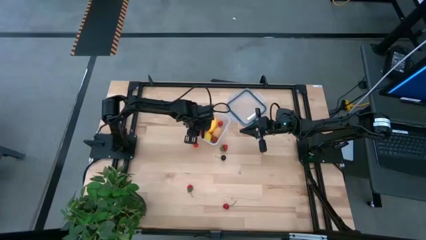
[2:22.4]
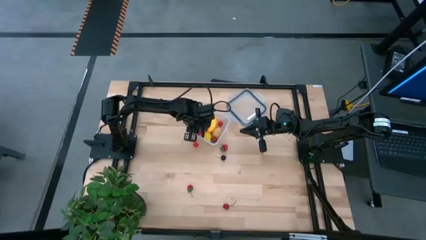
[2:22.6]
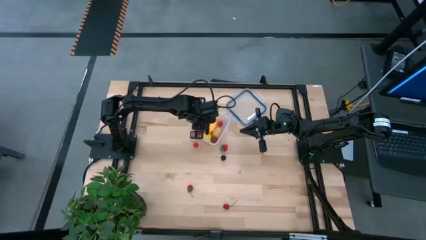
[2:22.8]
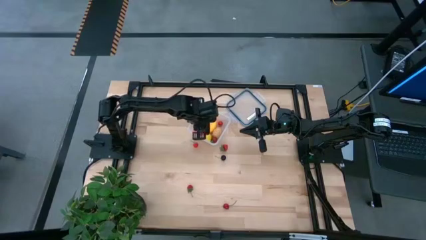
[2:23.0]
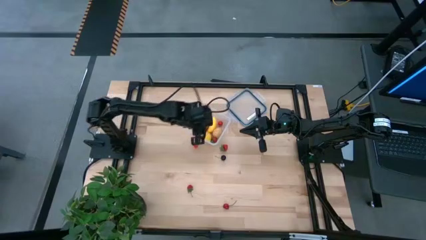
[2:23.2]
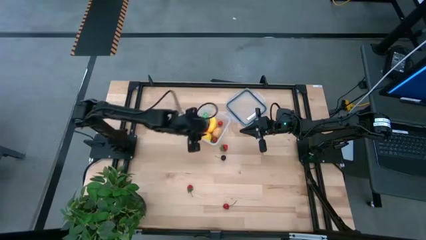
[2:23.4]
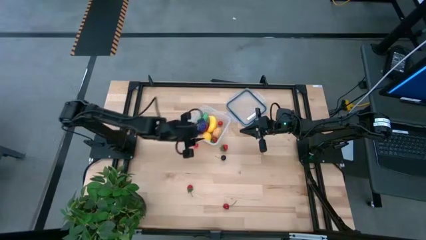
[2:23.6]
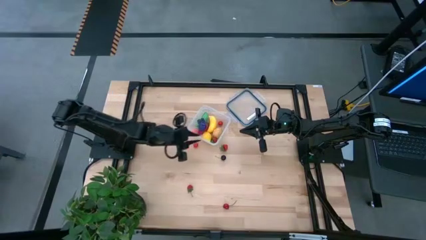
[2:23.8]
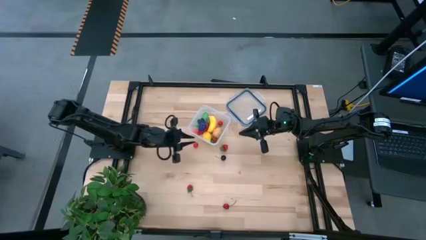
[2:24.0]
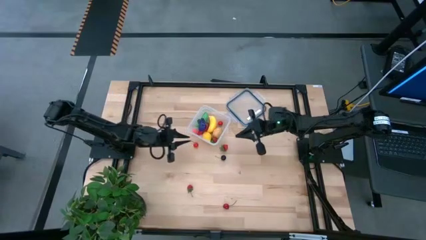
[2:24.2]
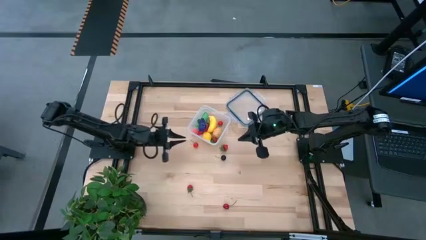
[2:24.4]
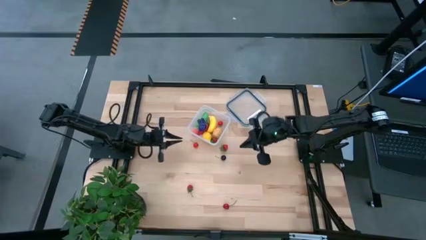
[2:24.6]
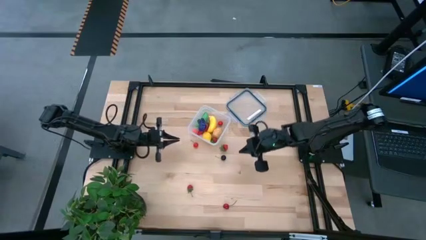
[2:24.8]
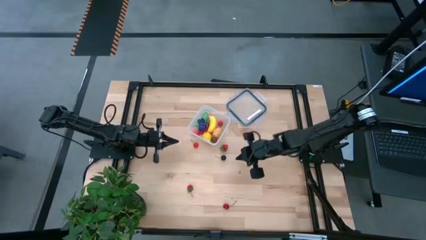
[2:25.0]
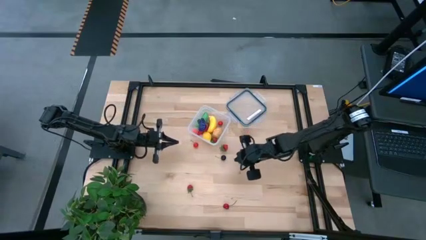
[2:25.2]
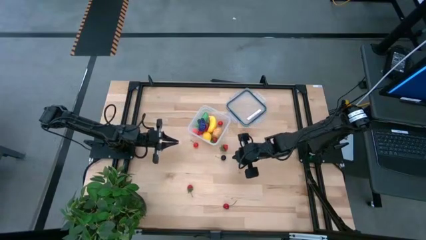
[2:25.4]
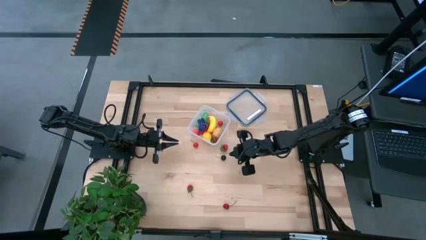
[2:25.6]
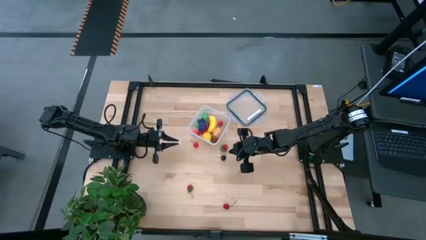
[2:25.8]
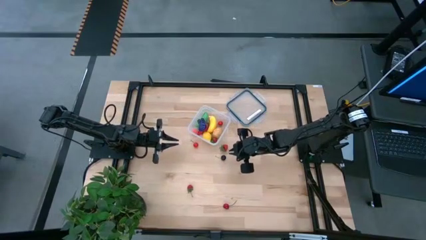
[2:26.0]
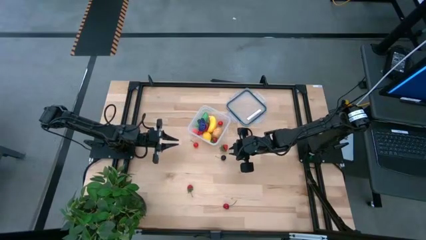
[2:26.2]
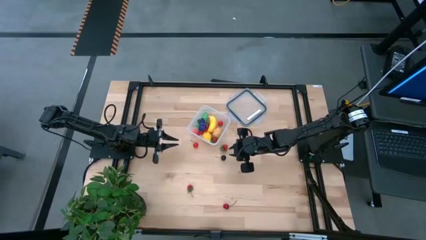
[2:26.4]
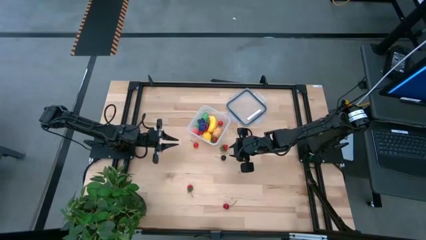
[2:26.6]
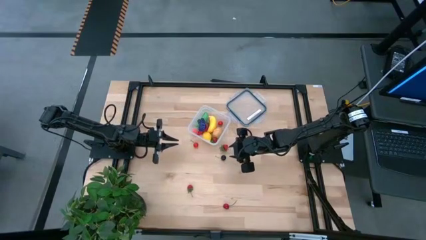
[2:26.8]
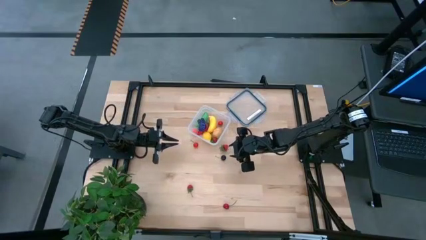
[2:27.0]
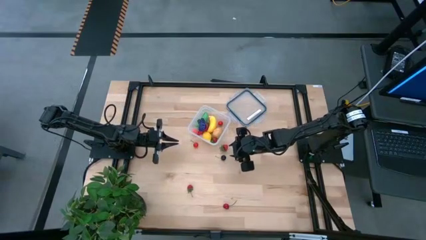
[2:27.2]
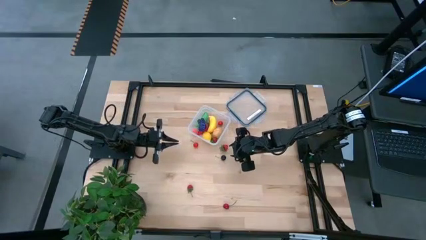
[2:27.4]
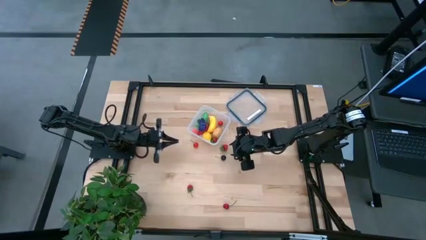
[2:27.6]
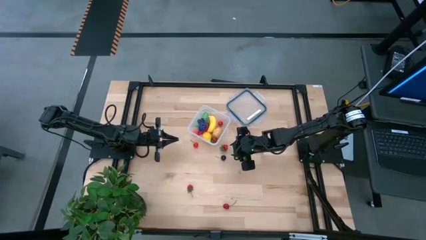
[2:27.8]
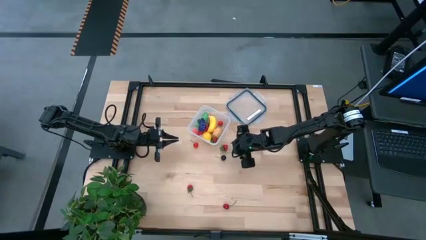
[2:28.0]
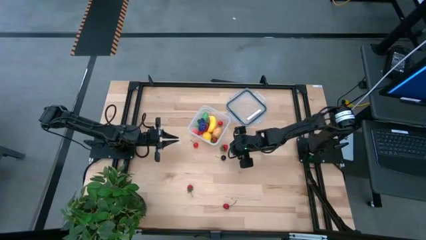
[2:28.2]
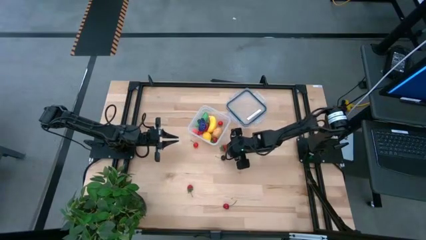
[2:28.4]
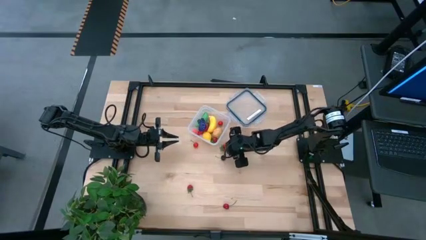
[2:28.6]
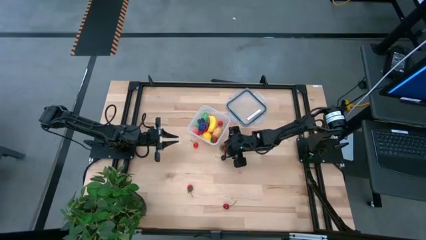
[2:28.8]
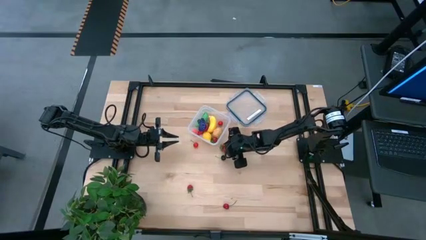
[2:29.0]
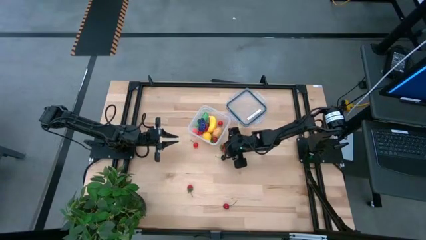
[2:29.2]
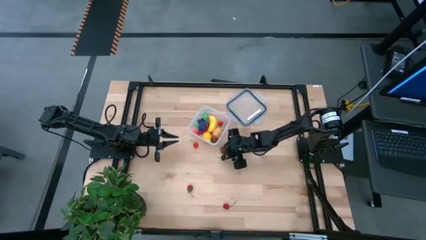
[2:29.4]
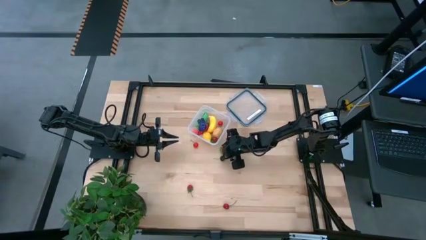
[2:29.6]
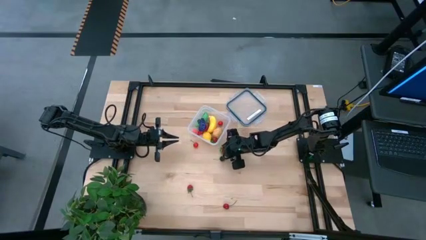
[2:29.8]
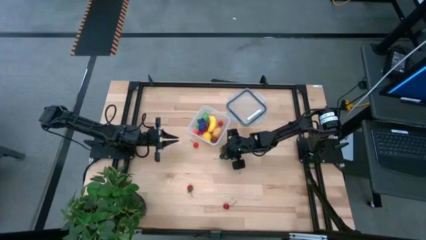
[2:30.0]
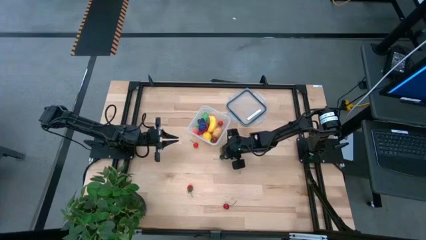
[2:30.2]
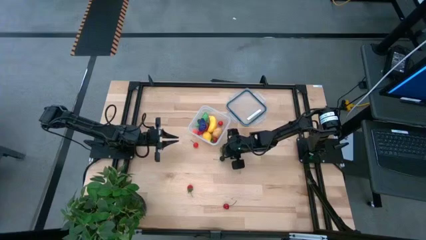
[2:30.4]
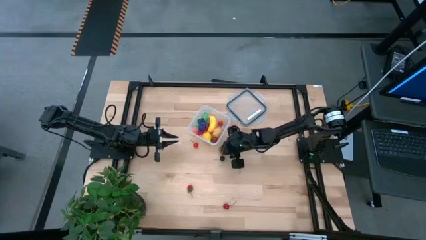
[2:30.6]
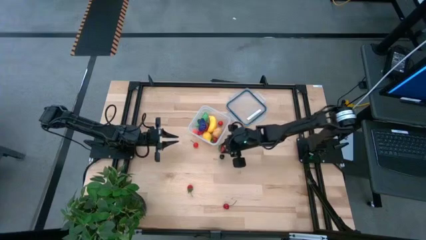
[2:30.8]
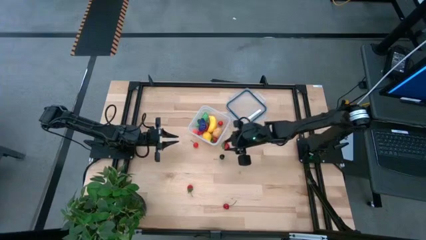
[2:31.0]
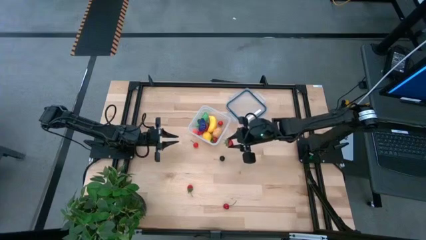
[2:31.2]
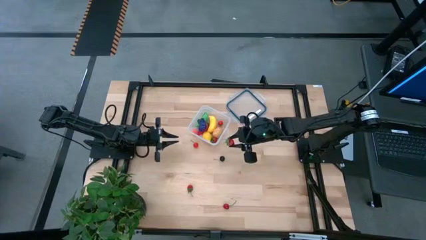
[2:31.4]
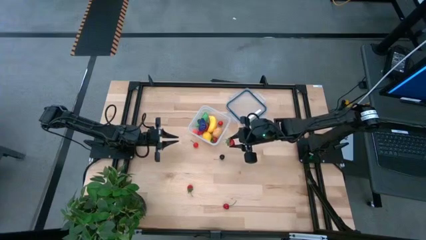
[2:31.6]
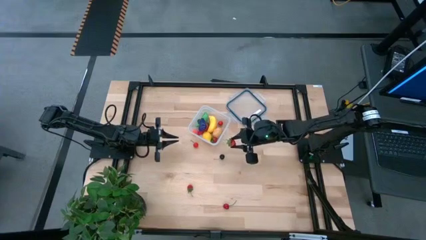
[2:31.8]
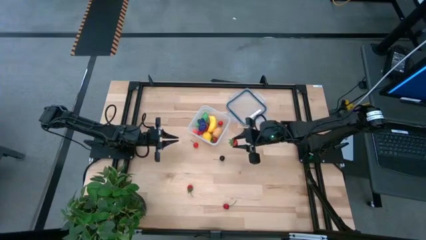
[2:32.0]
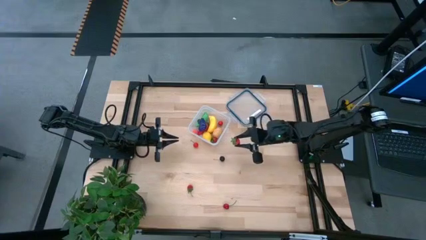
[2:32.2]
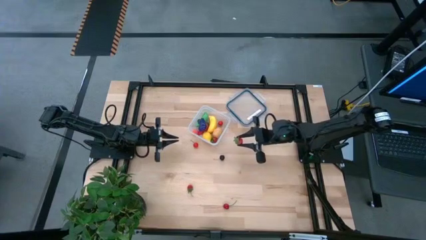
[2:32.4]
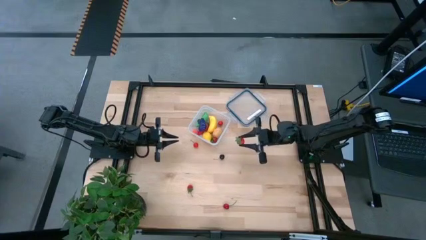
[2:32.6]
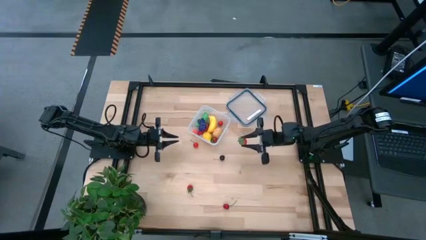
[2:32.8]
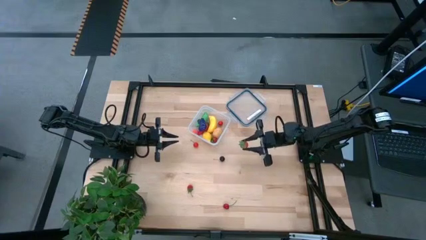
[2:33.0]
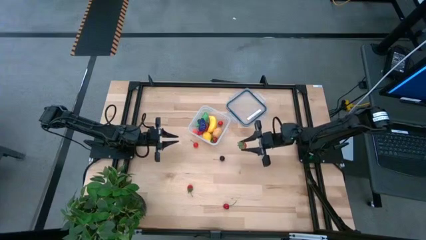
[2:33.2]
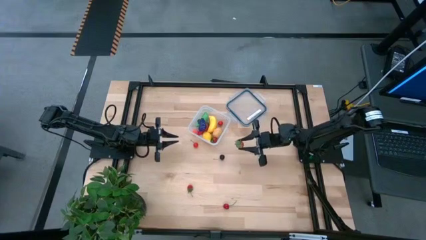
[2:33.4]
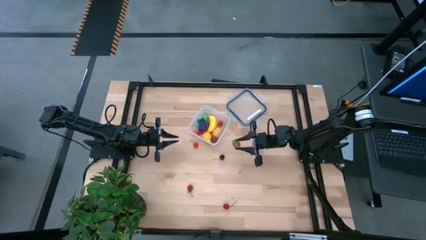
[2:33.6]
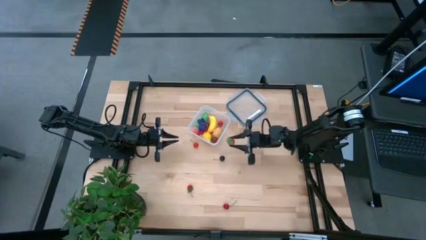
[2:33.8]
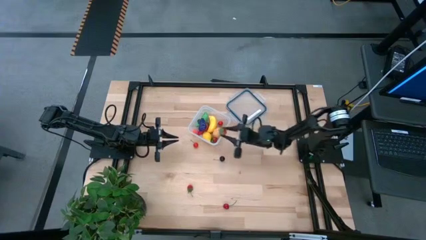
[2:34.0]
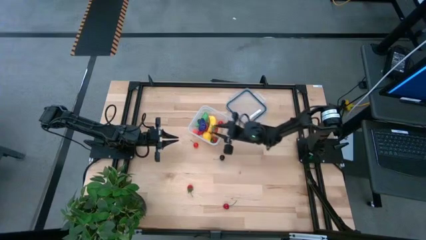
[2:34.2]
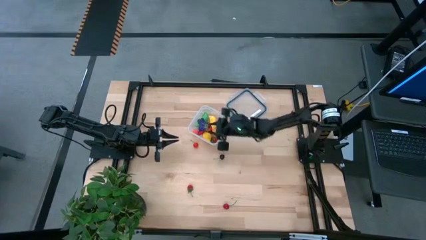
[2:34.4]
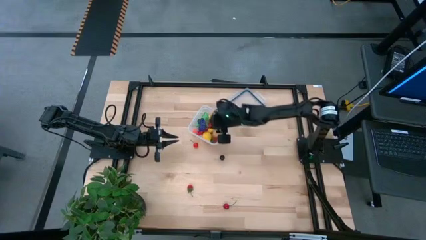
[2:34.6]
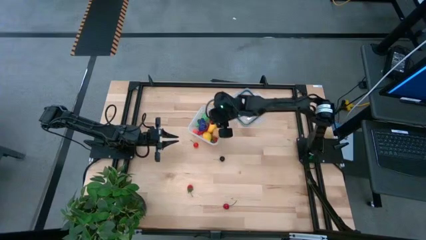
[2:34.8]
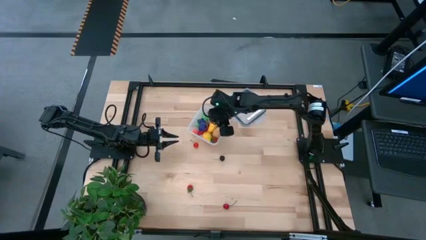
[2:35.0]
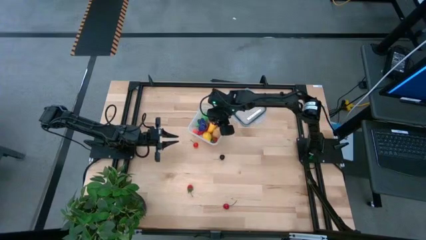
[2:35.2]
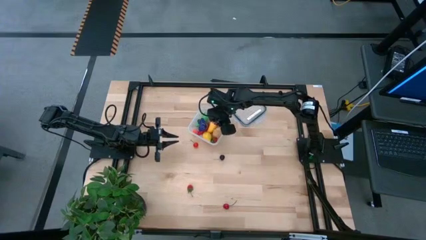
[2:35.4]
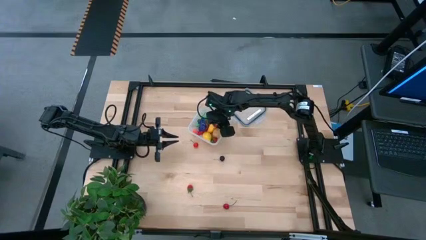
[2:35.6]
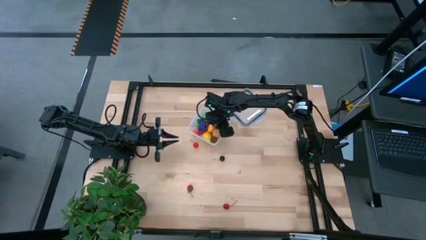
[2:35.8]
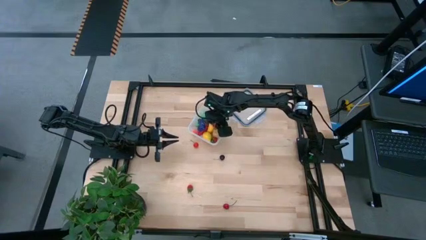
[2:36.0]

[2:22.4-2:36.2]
Task: Pick and placing Produce into tupperware
Put the top red strawberry into the transparent container

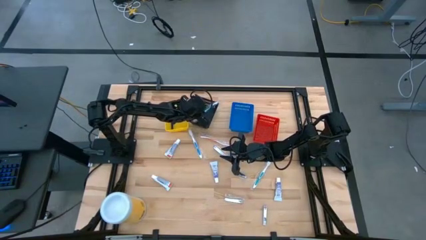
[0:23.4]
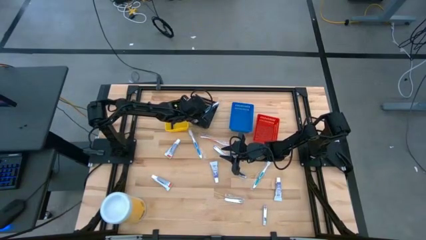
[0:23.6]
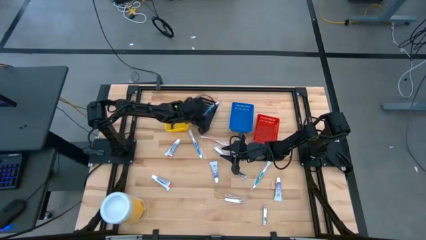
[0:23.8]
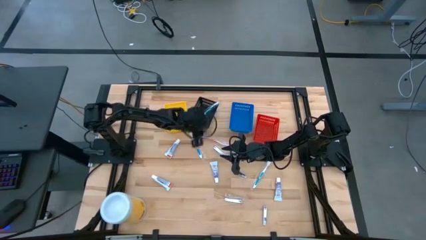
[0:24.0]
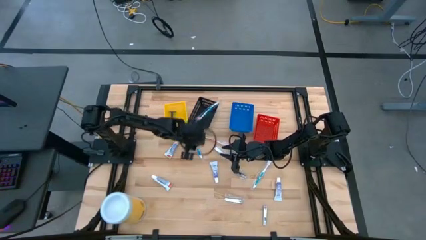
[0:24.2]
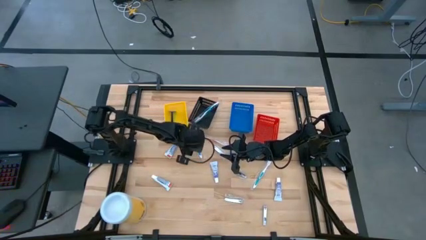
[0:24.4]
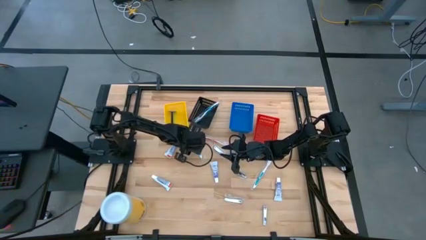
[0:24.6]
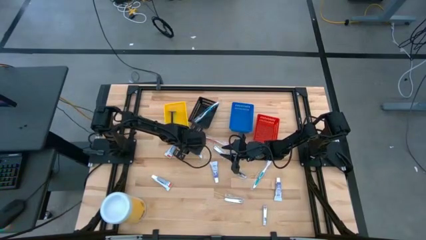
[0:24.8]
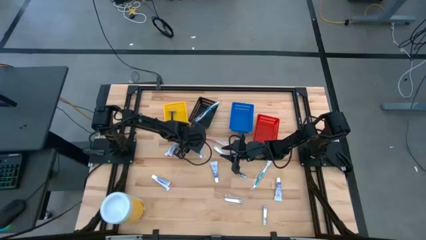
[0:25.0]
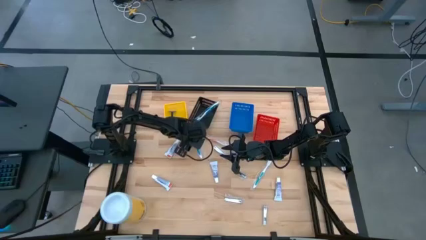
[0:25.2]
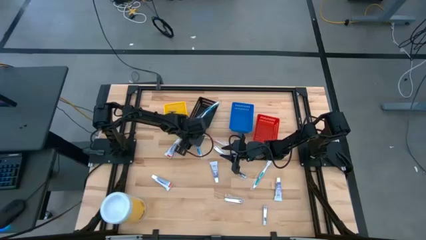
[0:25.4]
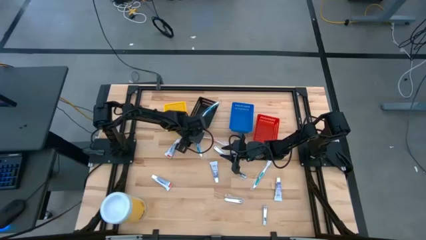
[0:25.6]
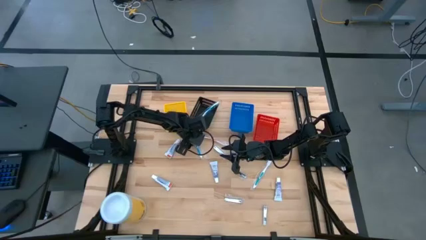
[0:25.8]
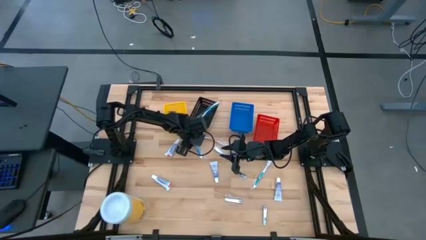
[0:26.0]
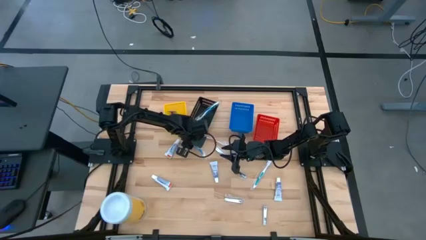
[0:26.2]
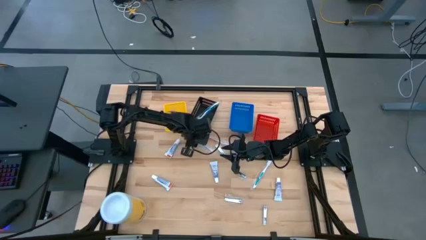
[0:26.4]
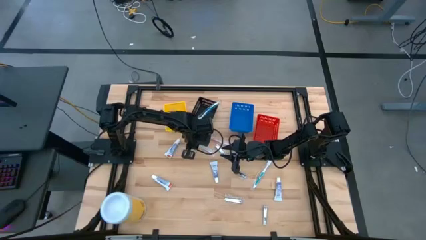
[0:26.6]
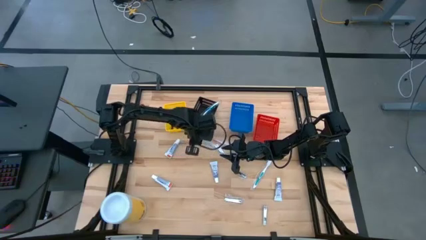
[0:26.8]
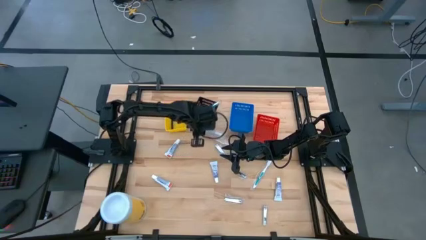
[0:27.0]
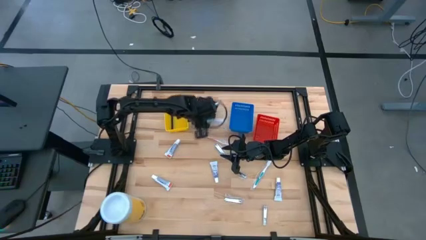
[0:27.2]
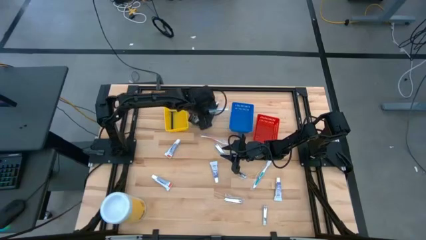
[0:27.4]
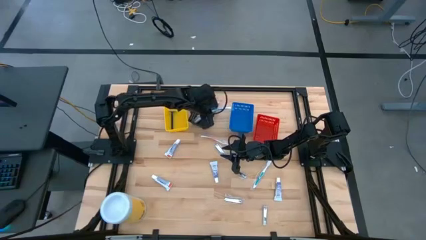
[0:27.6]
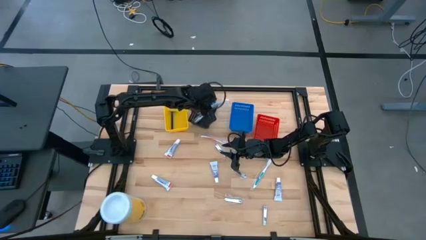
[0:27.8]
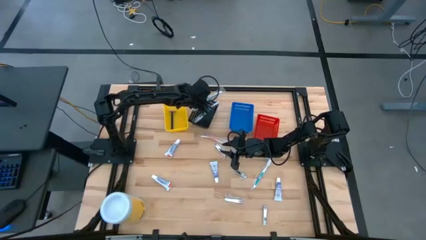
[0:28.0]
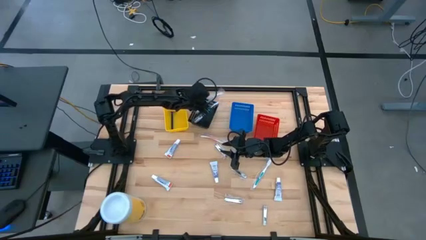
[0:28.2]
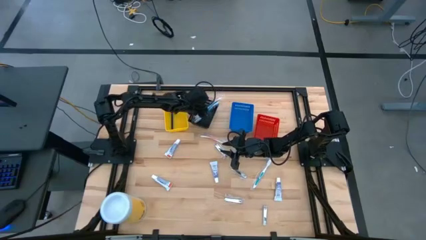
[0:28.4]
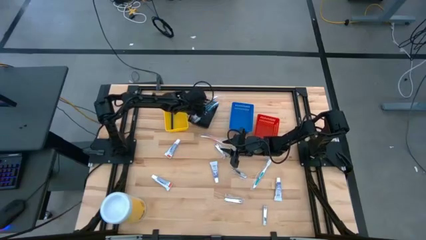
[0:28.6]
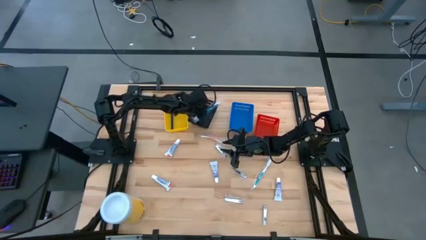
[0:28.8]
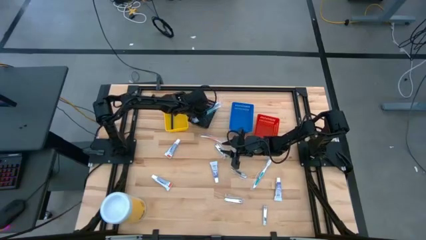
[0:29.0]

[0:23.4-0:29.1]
Task: Pick & Place Travel size toiletries
Put the blue toothbrush into the black bin
